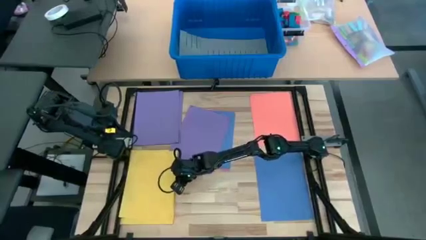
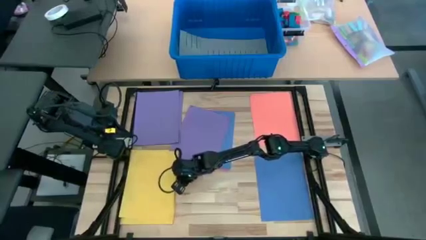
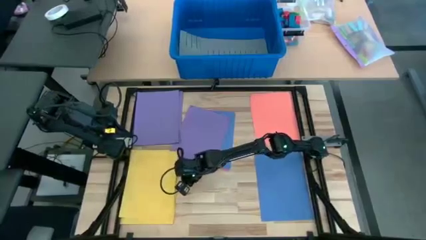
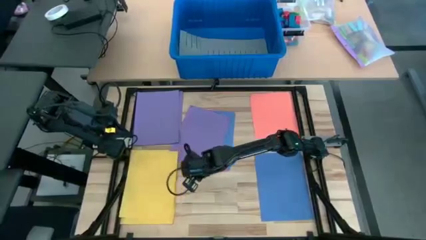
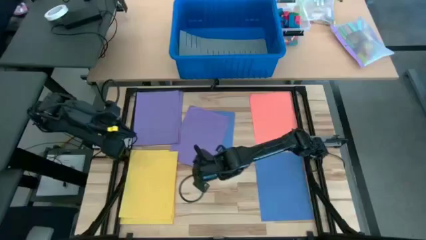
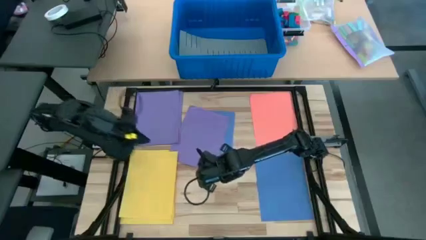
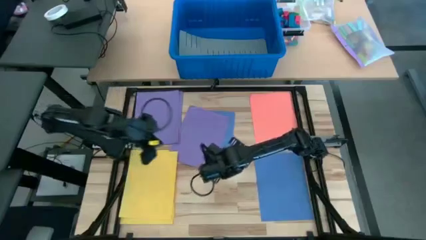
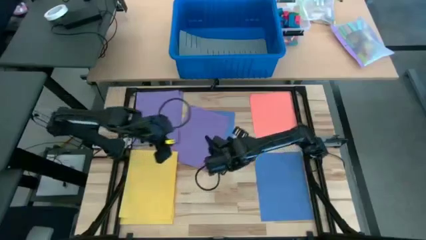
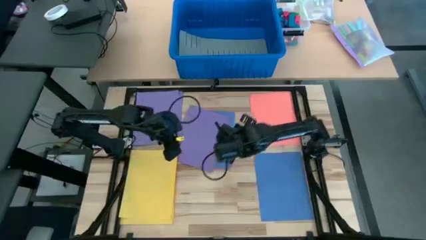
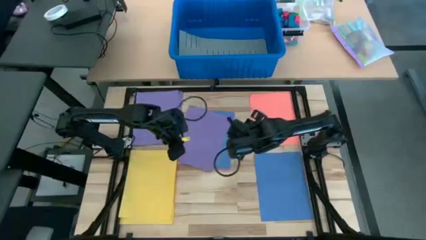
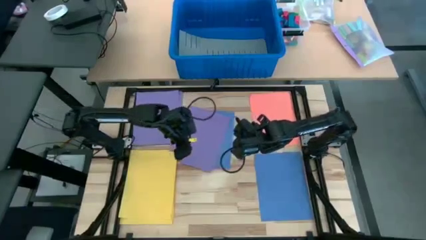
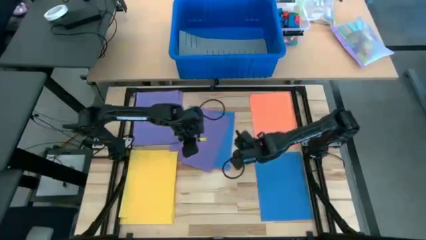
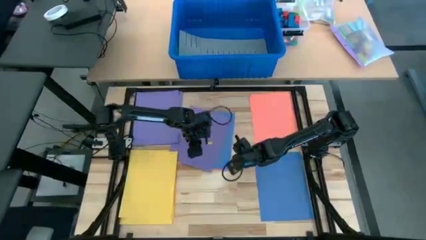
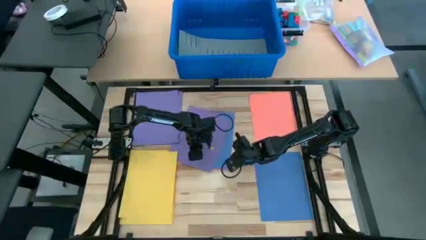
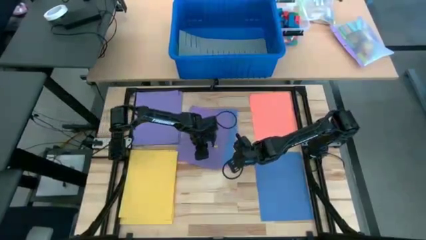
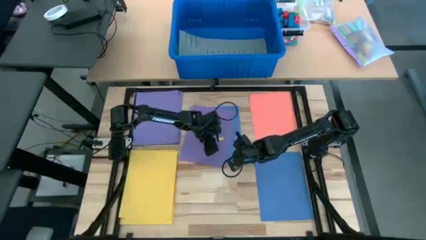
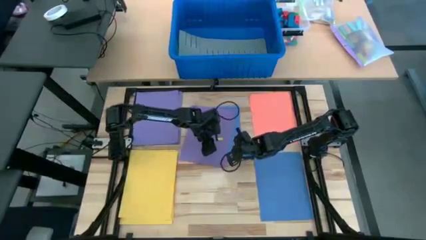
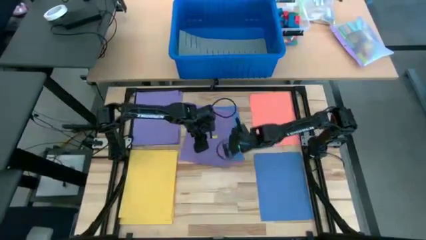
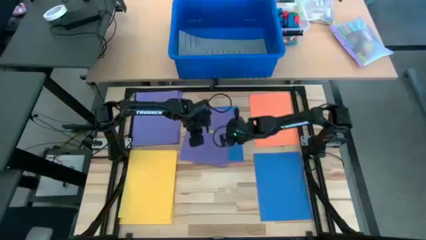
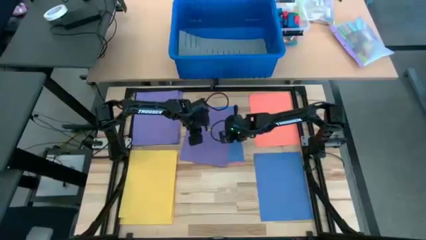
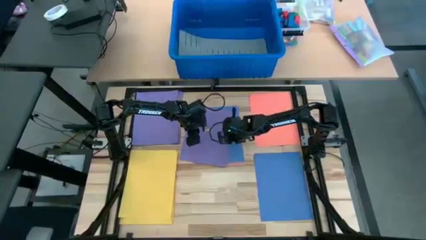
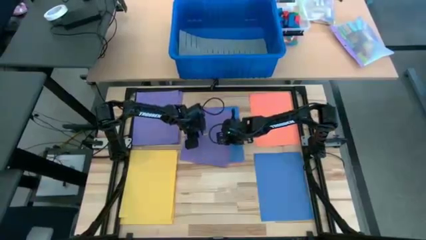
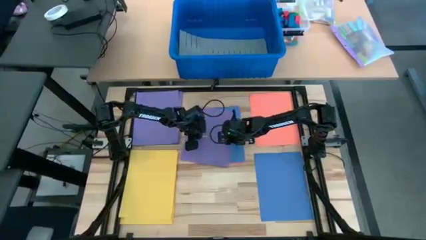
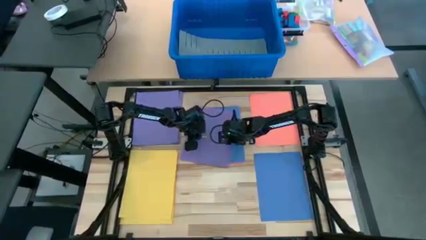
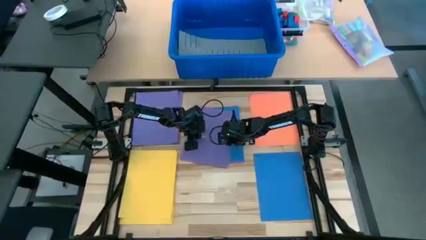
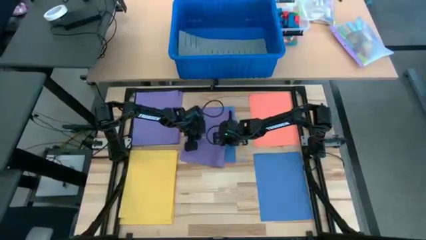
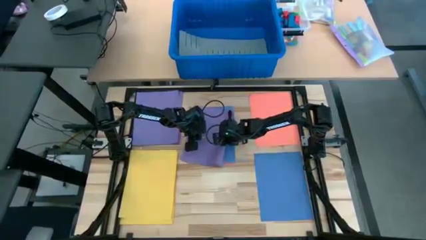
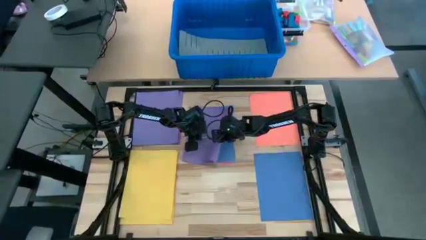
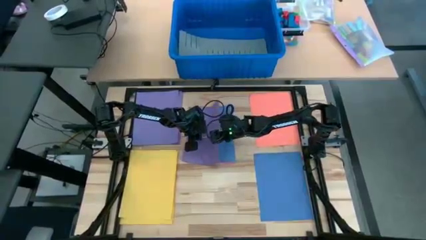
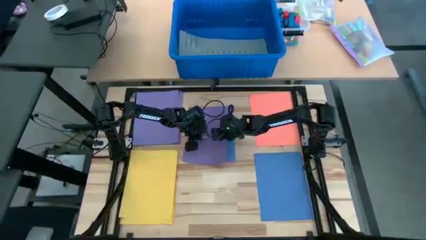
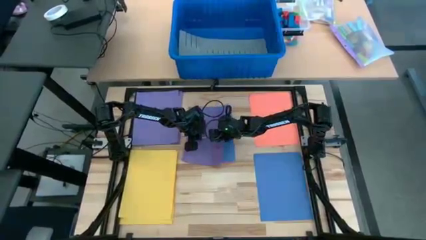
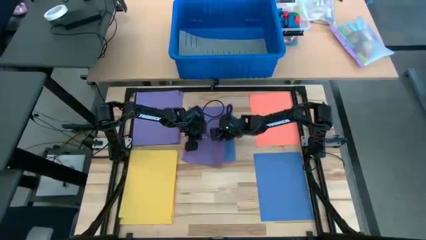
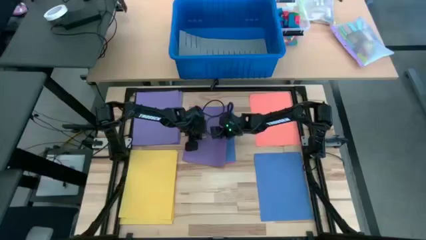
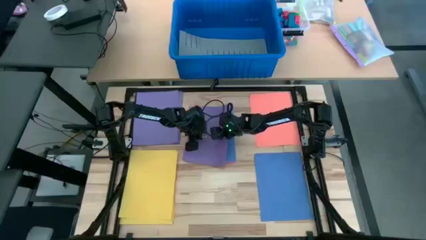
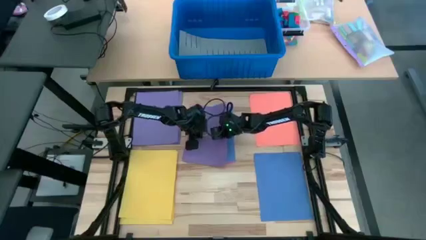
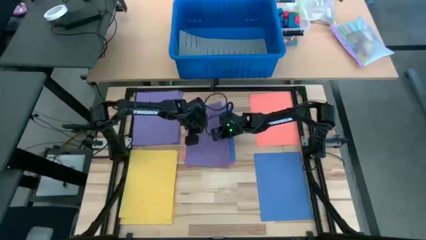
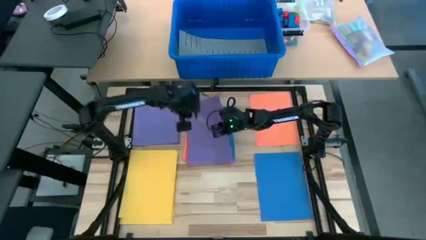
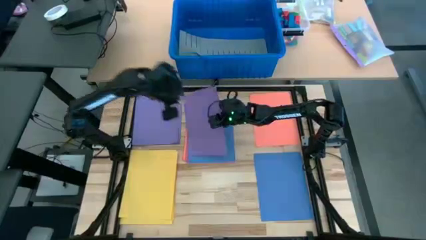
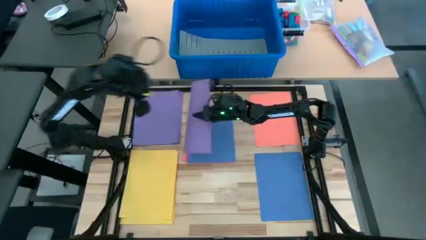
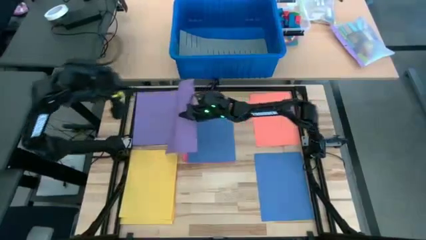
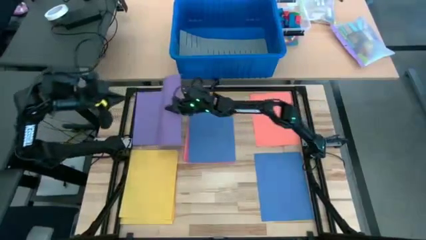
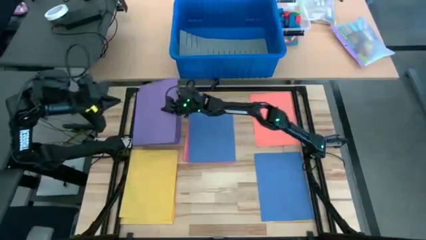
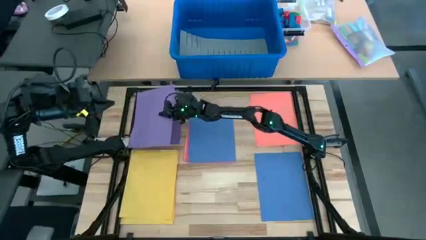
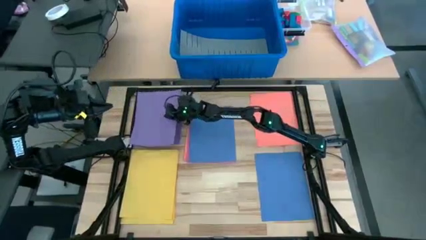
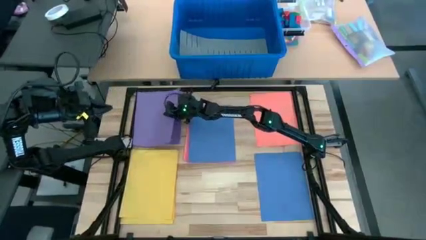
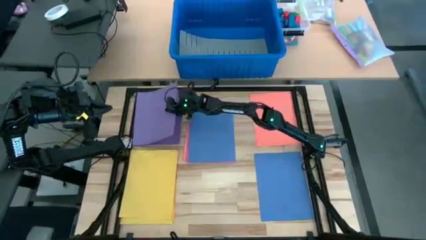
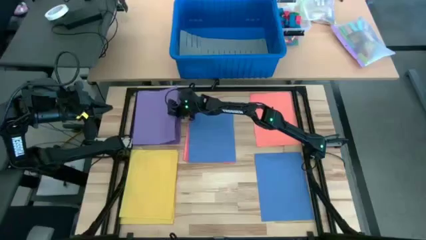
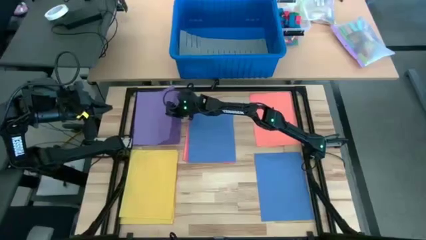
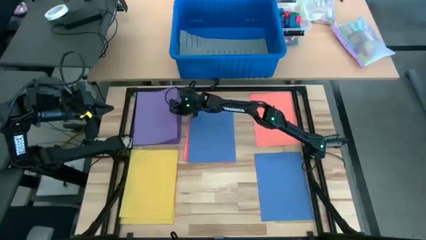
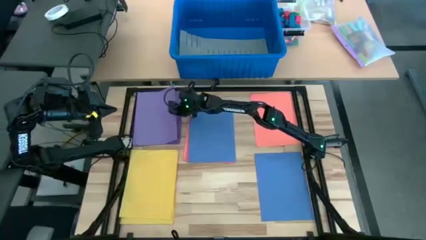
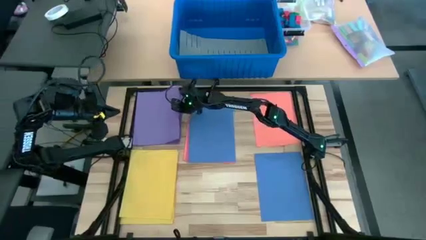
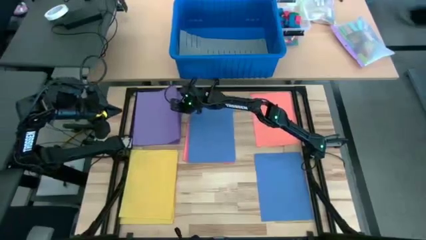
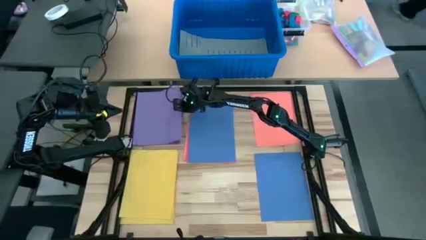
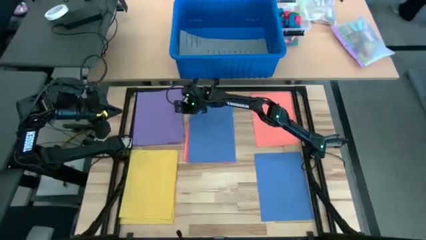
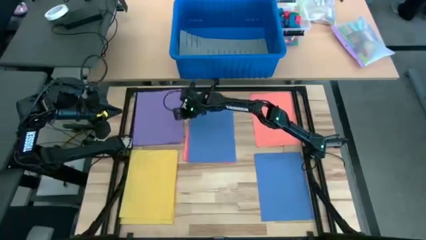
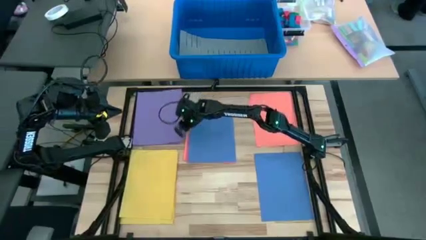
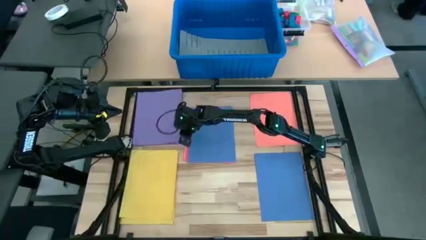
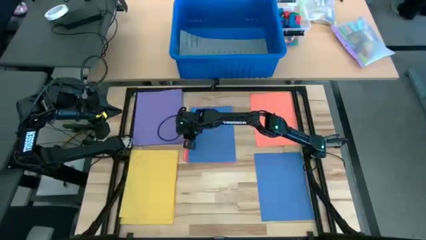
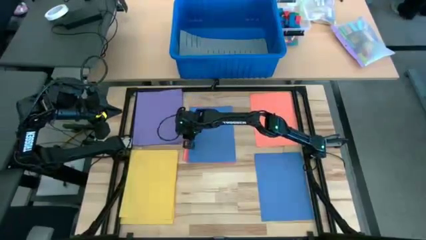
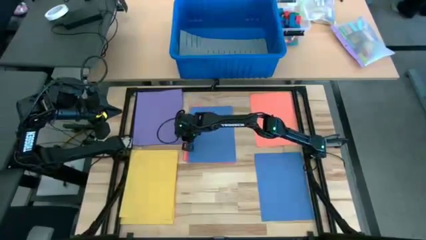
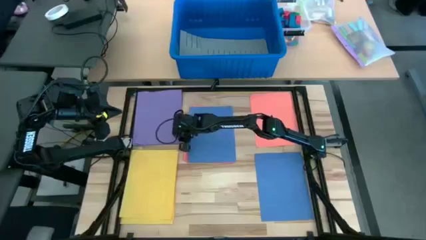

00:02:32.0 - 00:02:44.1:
Task: Organize paper
Stack the purple colored paper on top of the other purple colored papers

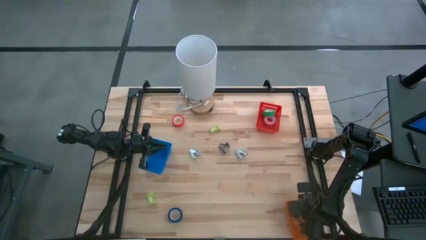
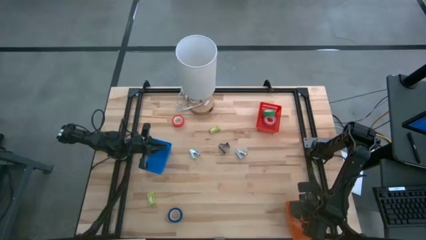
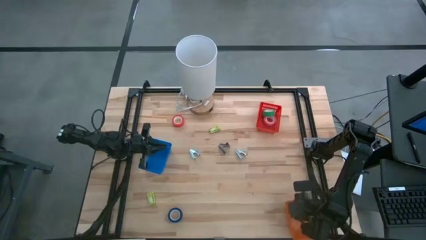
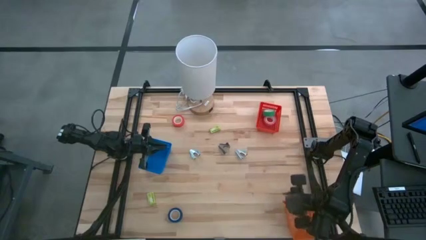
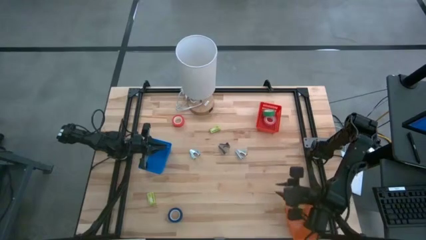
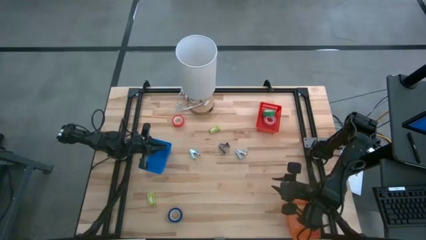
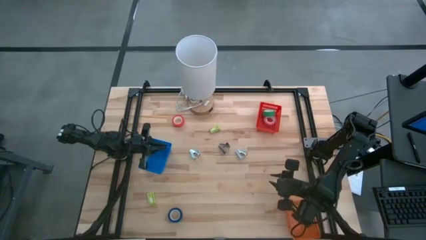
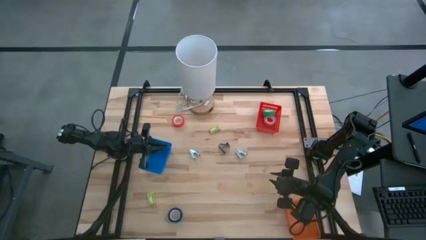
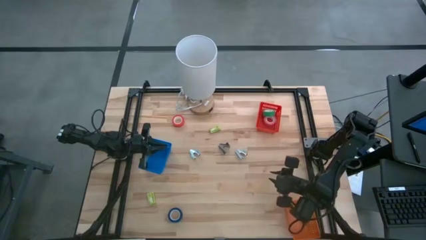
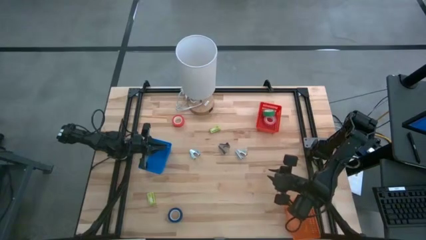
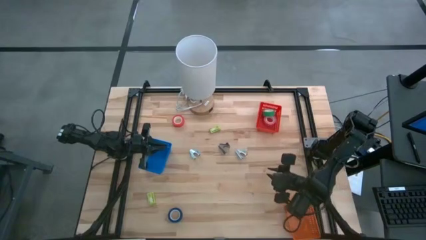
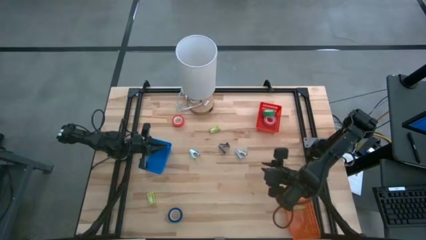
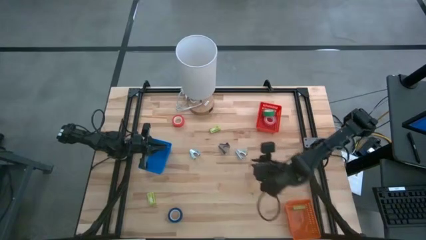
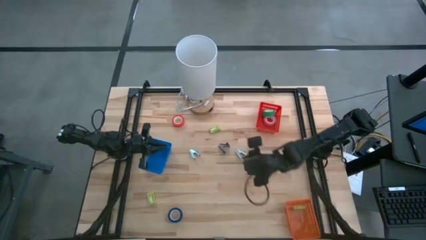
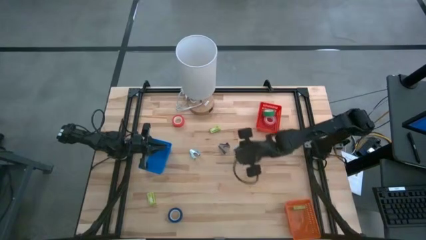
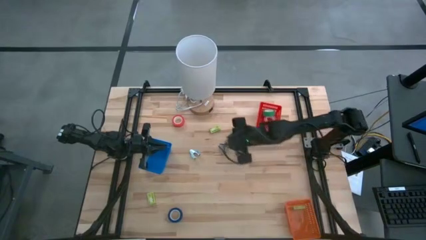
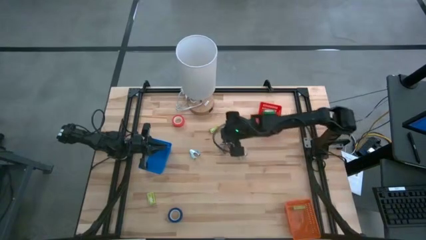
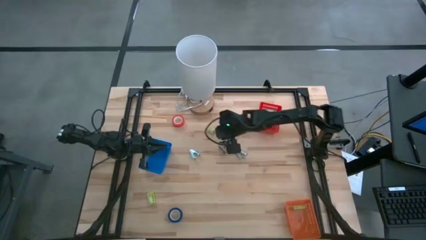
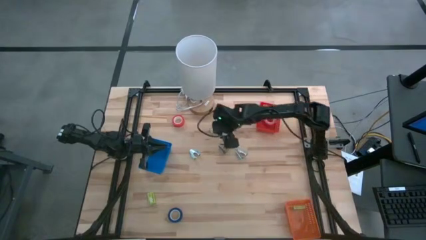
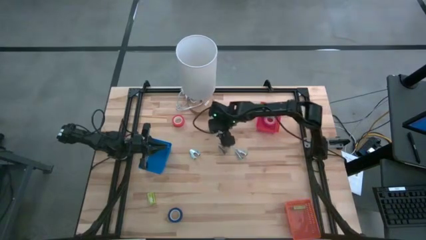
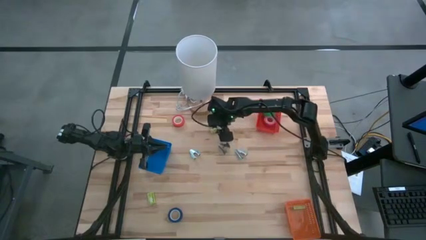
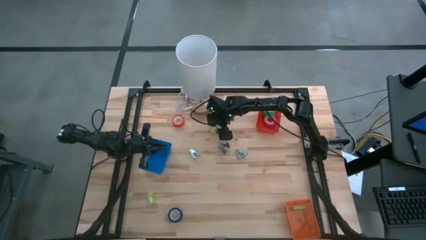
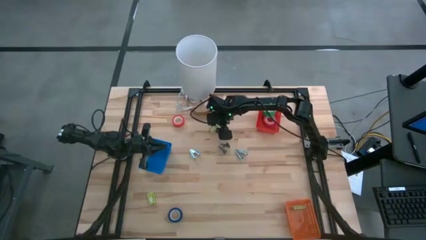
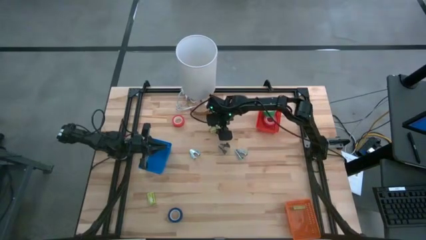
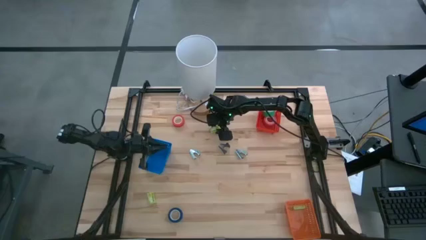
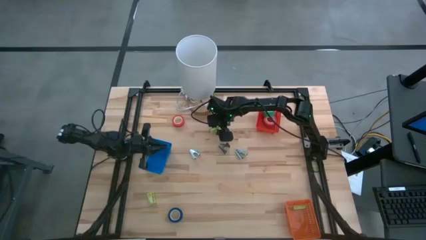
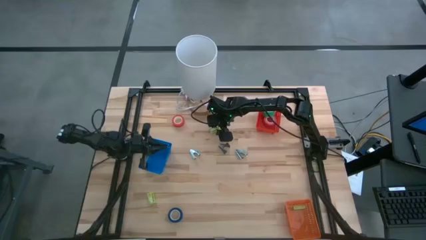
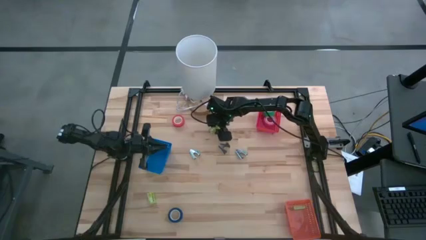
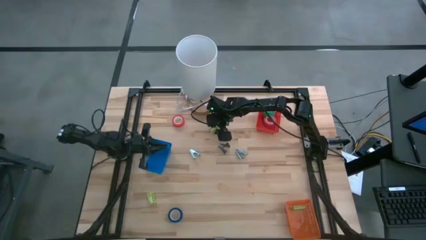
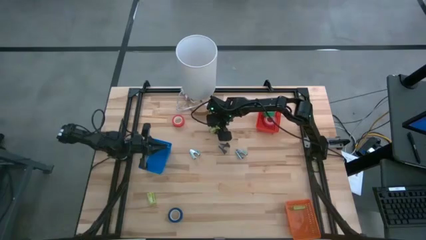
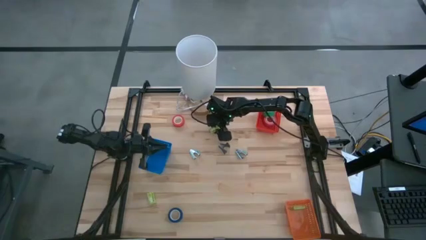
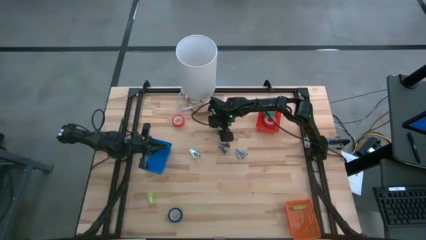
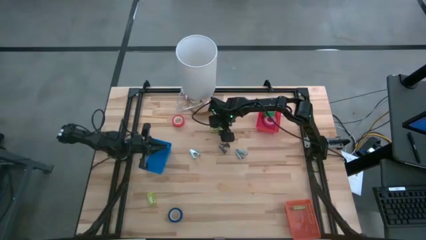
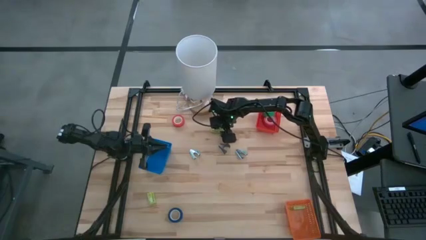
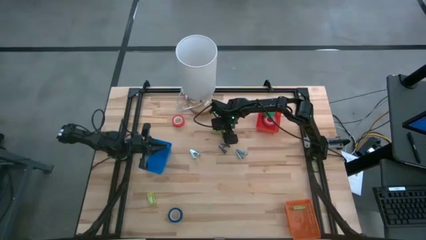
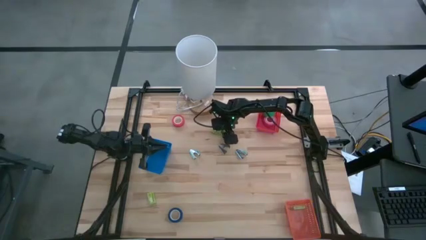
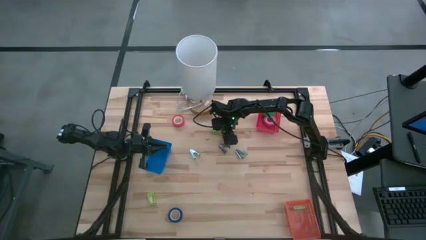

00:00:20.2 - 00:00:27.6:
Task: Pick and place Stapler, Stapler remover, tape
Put the top staples box into the orange bin
